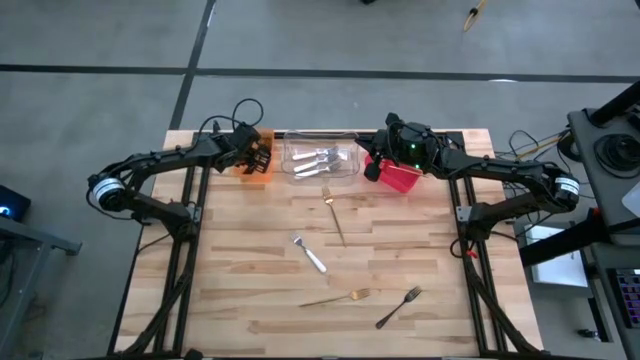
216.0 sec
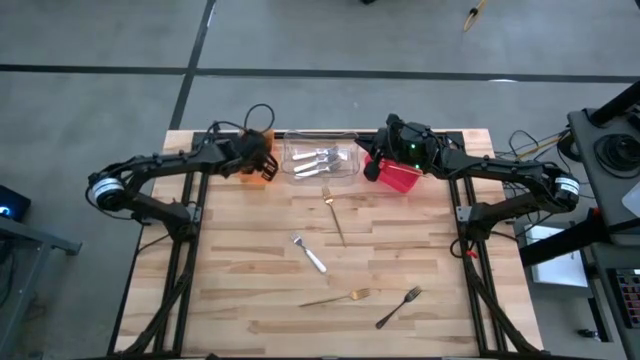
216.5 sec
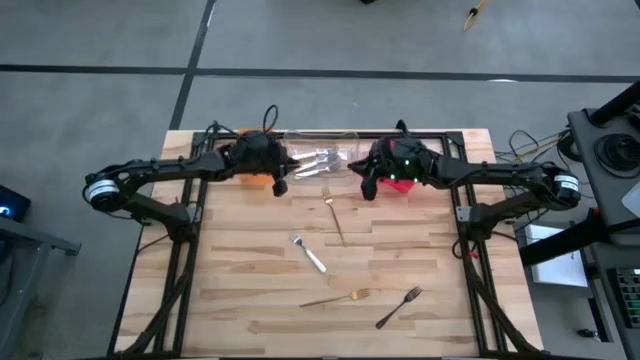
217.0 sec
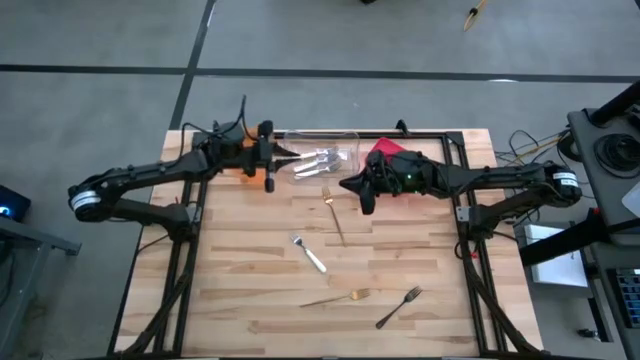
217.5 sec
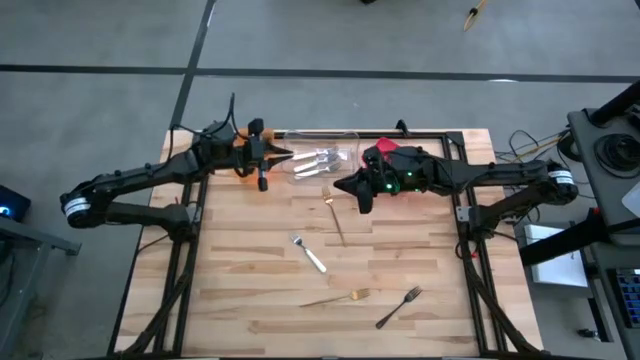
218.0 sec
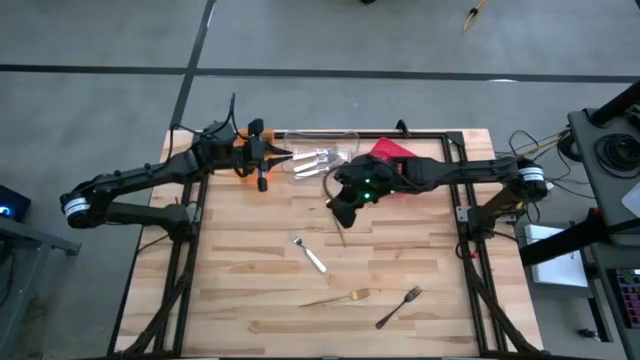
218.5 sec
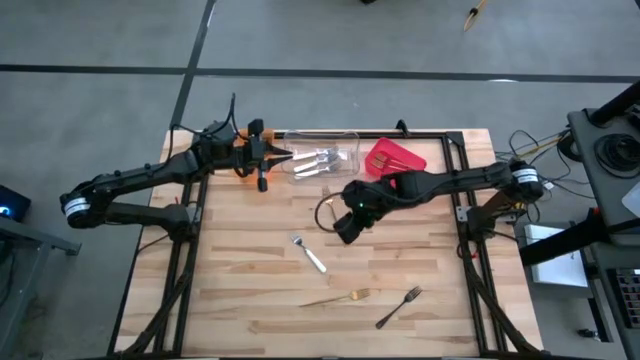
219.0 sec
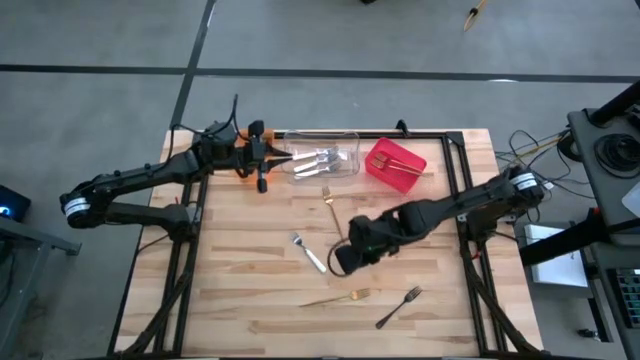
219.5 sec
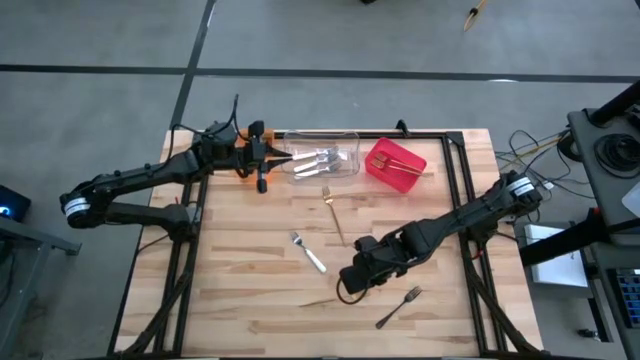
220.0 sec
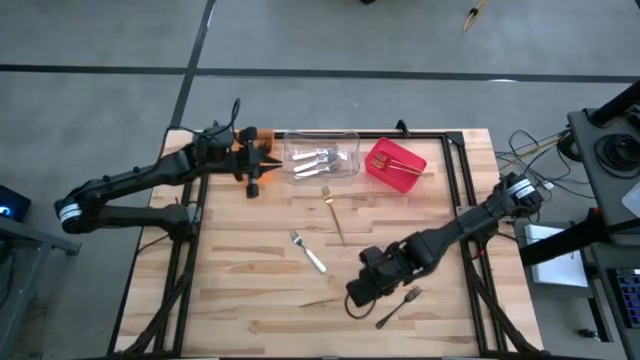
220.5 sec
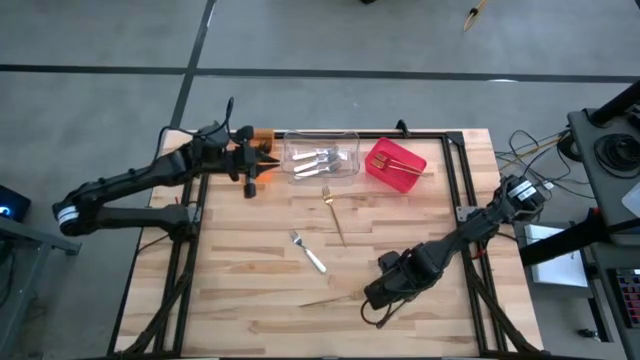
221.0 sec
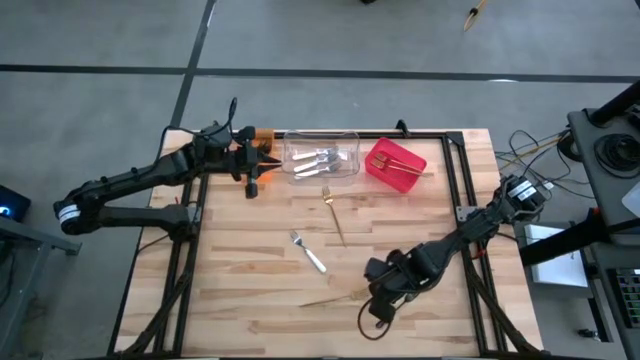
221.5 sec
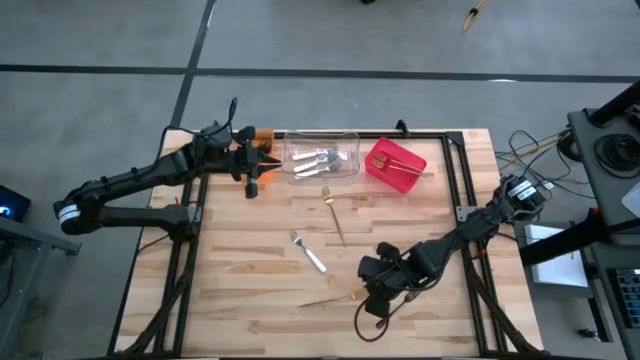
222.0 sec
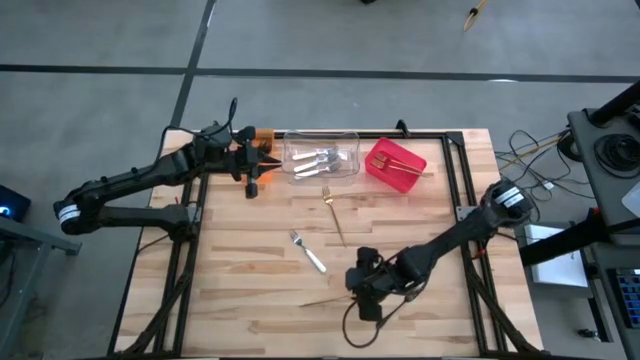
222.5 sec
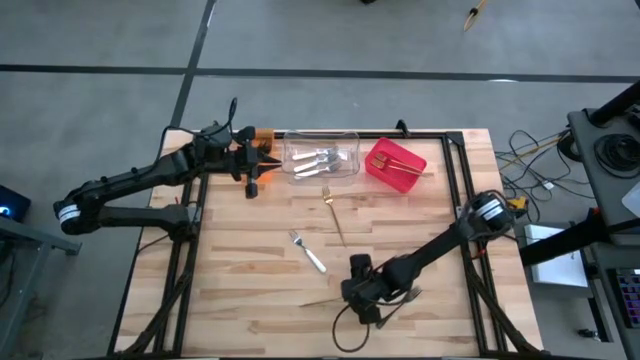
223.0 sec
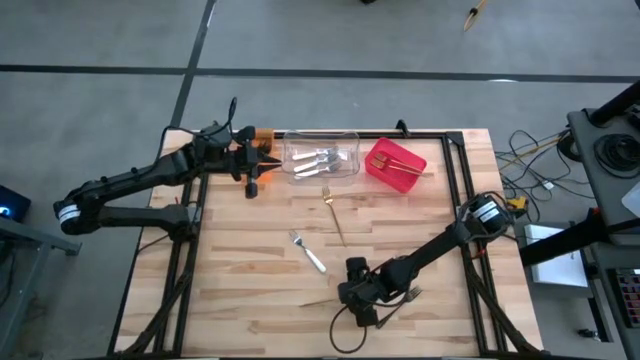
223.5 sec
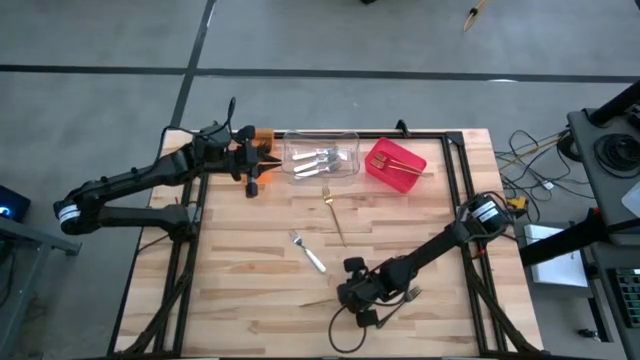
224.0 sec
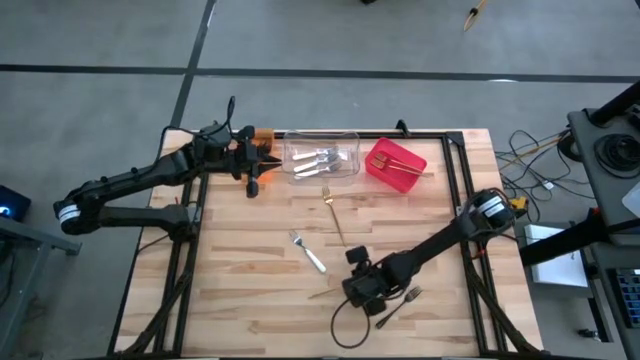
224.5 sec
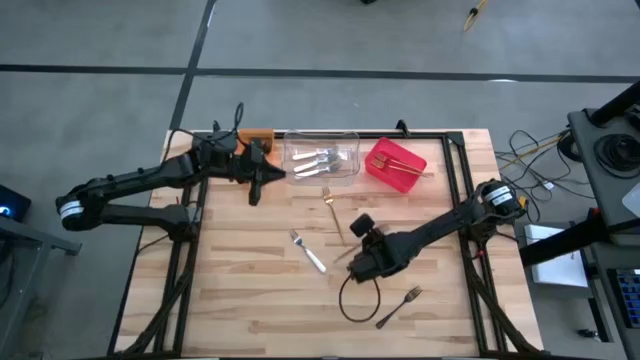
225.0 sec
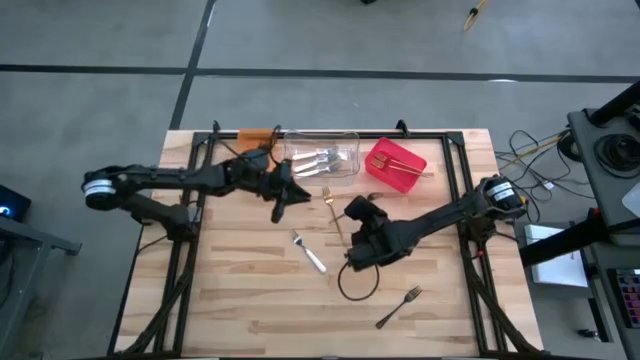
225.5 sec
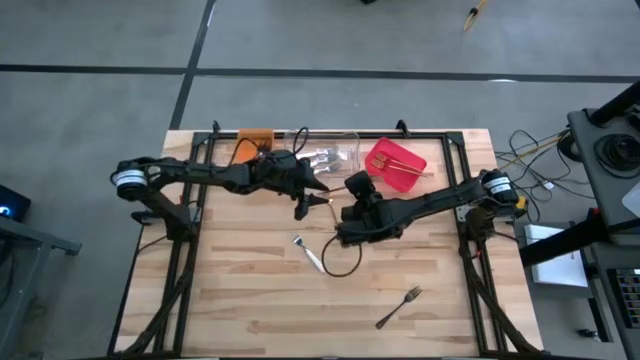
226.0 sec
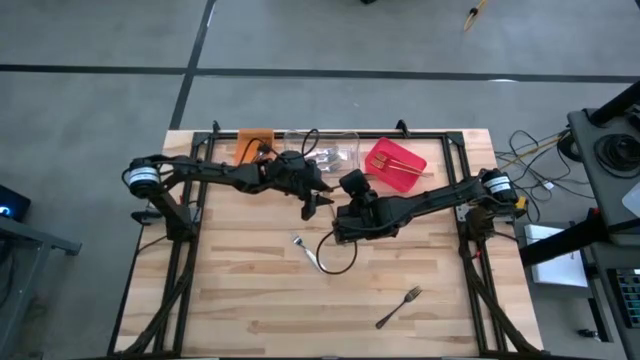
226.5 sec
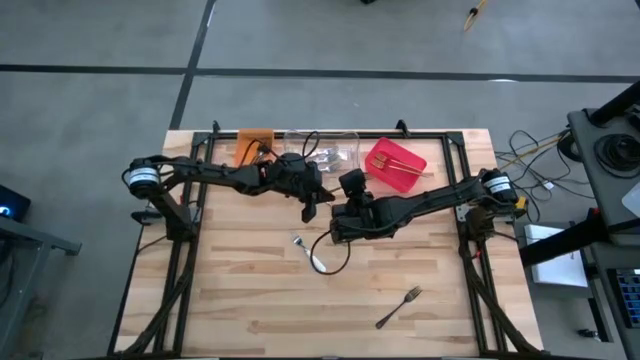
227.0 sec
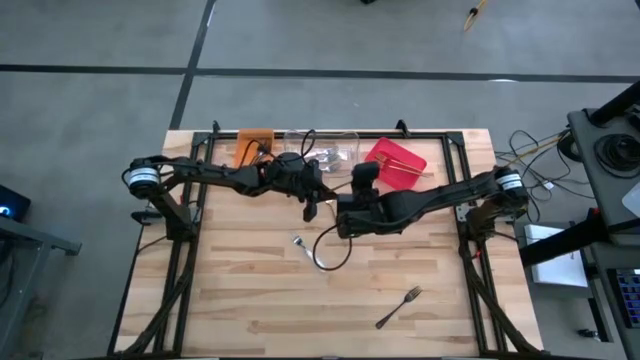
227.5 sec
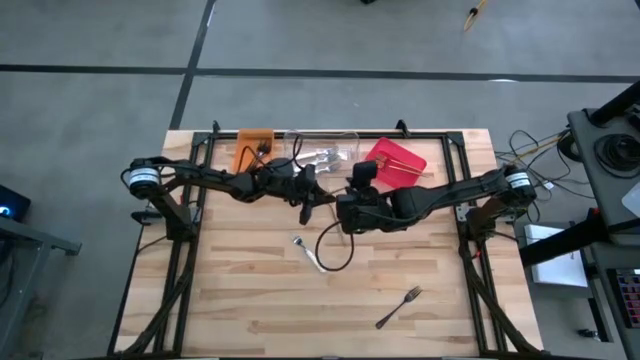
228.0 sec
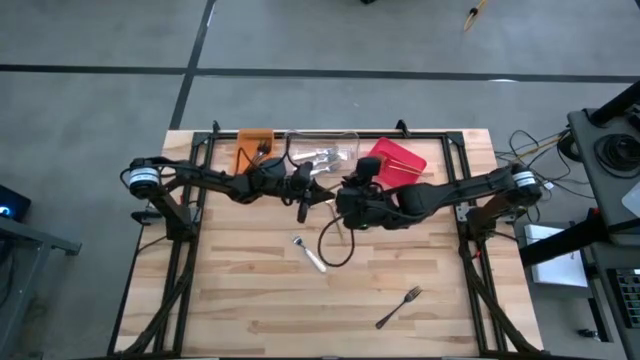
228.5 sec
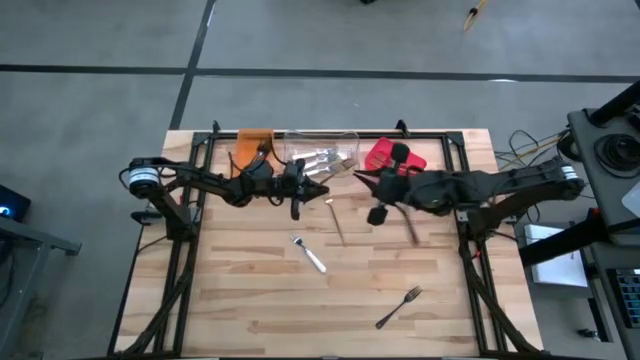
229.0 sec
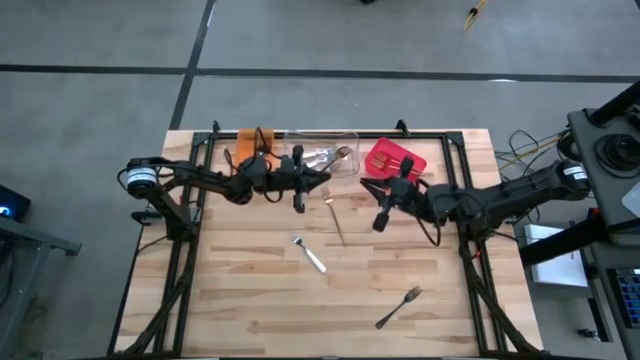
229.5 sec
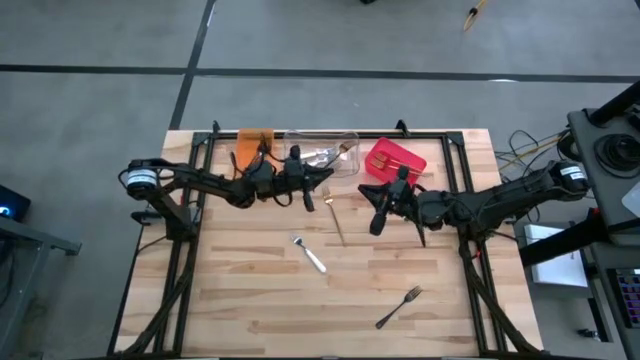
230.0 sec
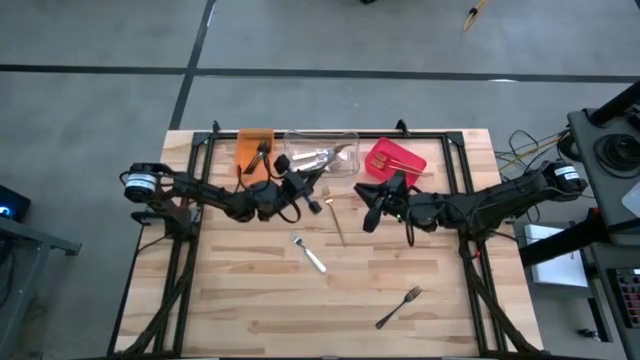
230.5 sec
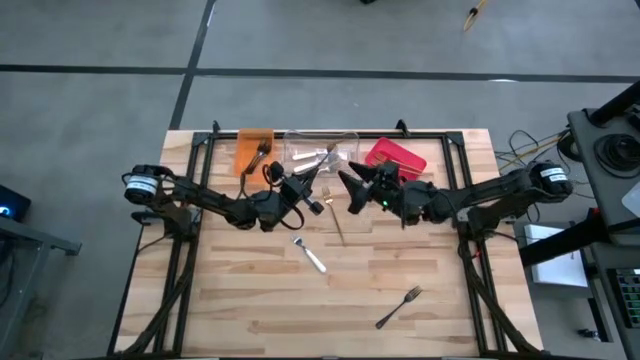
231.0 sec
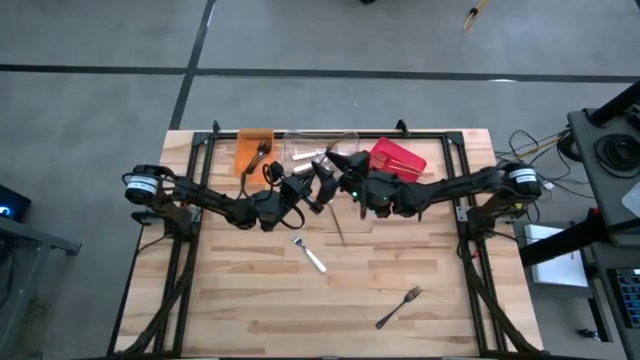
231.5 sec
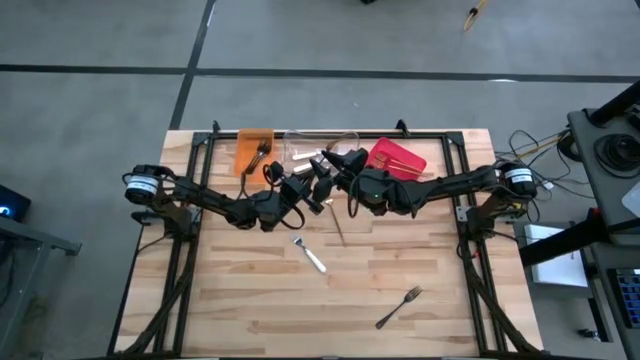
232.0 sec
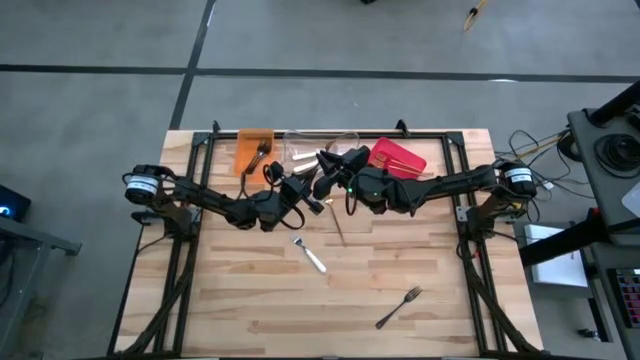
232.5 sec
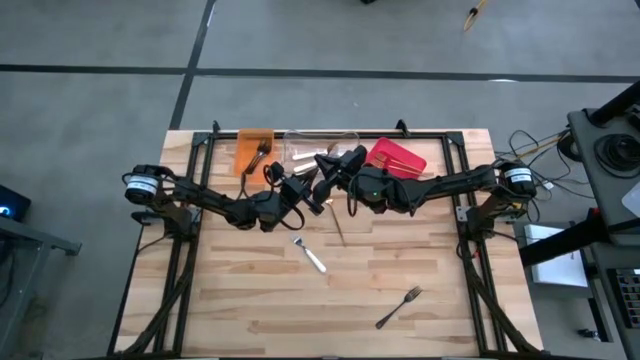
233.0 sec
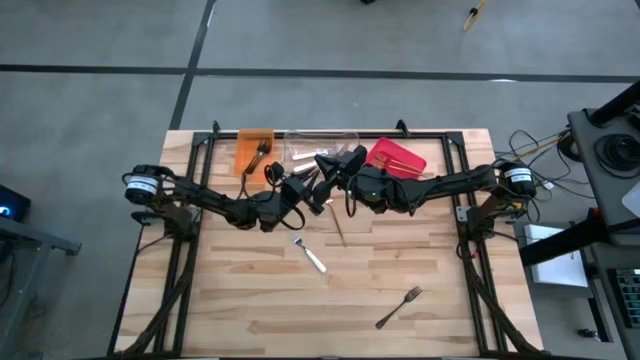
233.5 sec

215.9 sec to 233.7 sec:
Task: Sort silverware by color (type)
Put the gold fork into the red bin

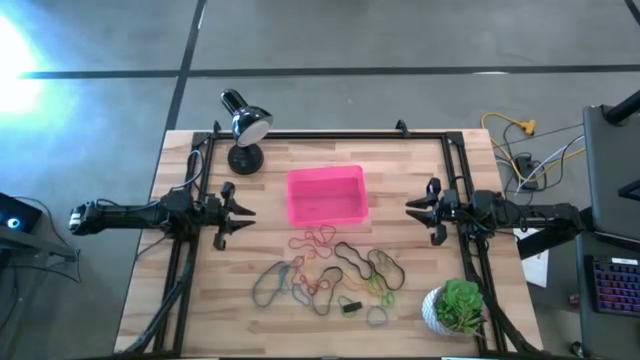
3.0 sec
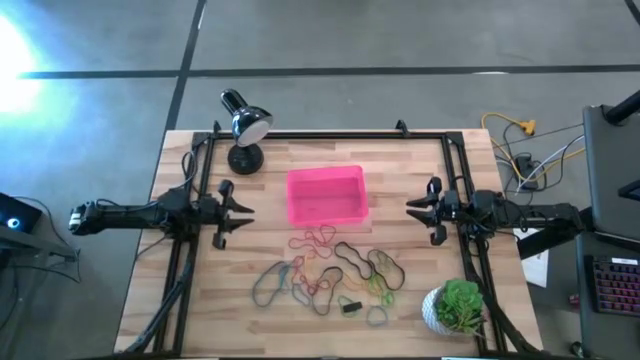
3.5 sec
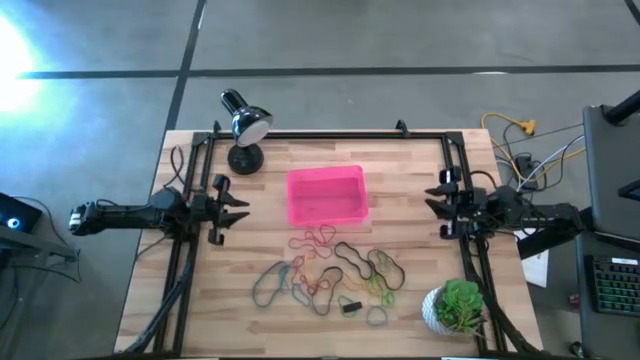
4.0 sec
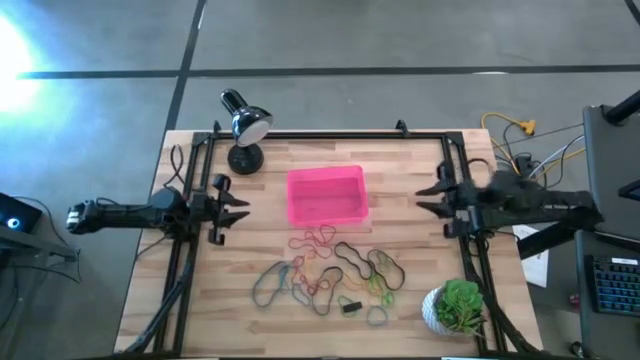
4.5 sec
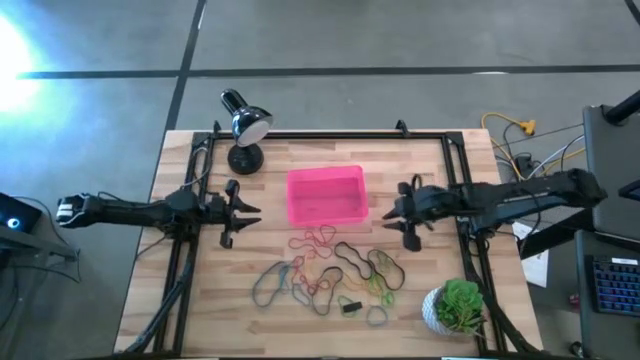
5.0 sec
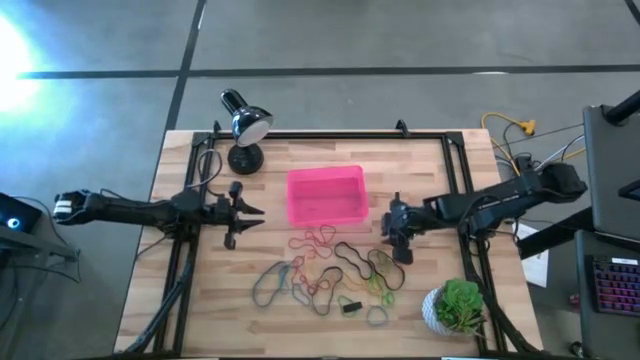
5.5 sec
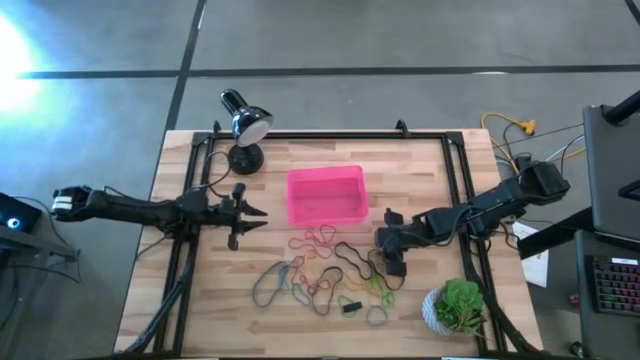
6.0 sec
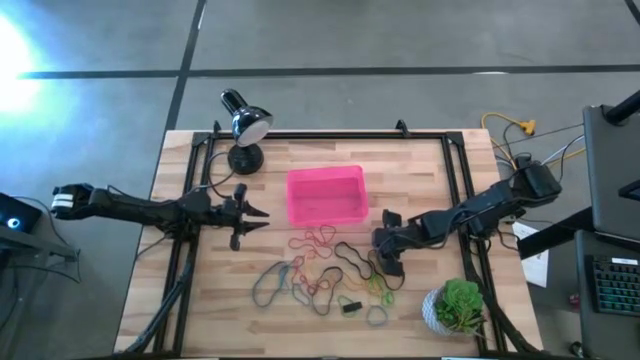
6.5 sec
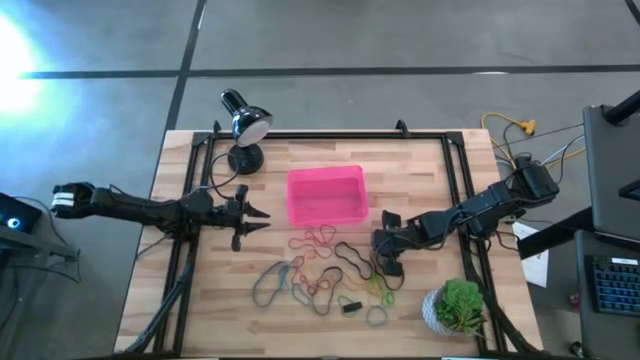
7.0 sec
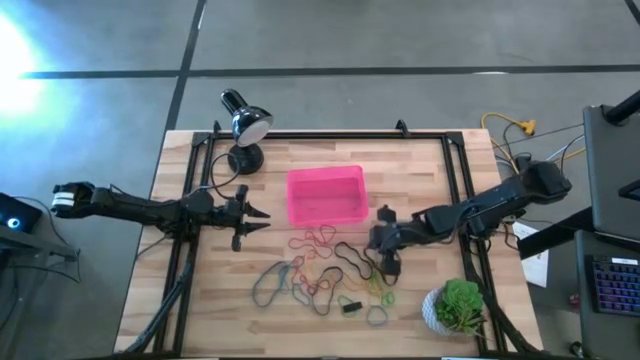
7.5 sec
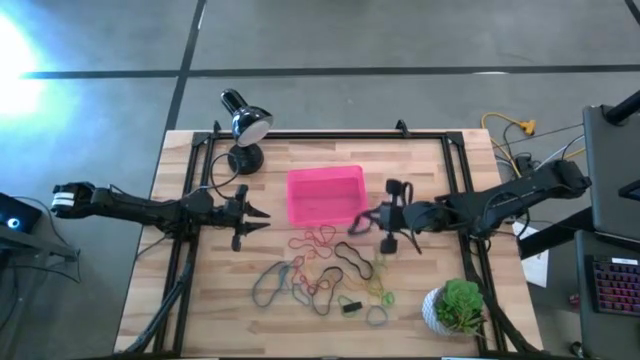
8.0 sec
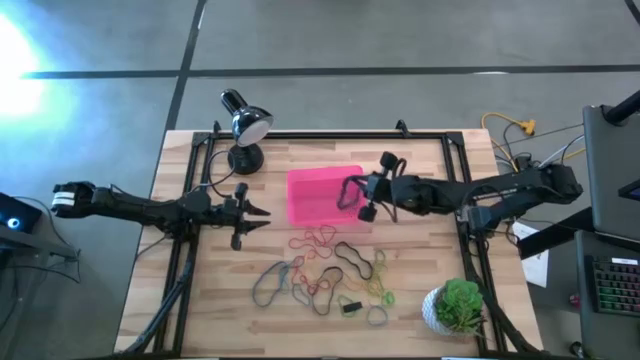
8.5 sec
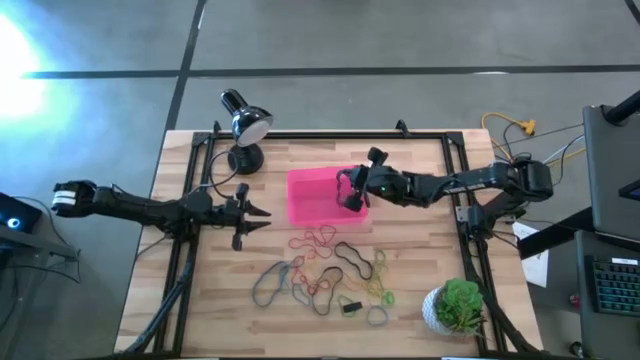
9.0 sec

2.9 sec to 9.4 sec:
Task: Pick and place rubber bands into bin
Put the black rubber band into the red bin
